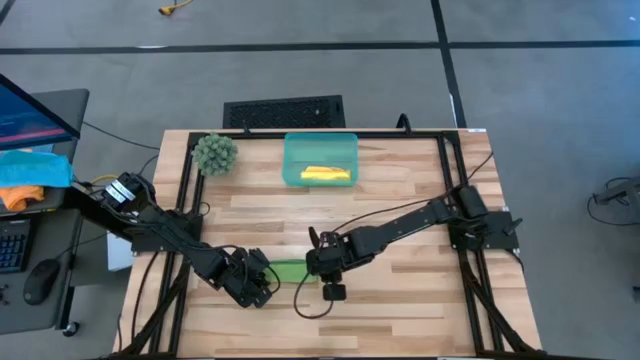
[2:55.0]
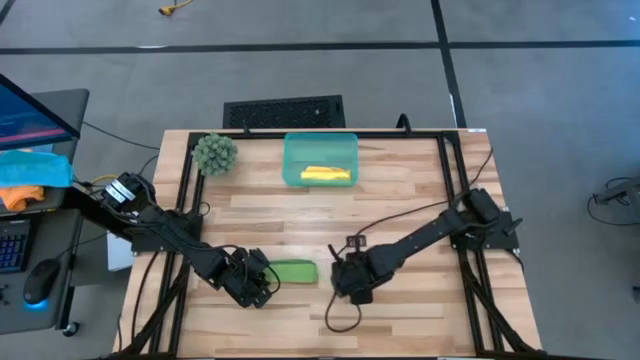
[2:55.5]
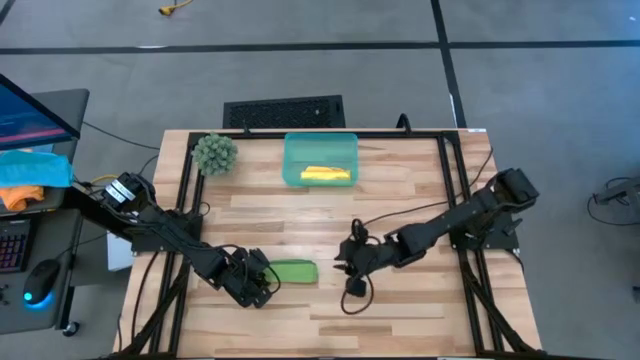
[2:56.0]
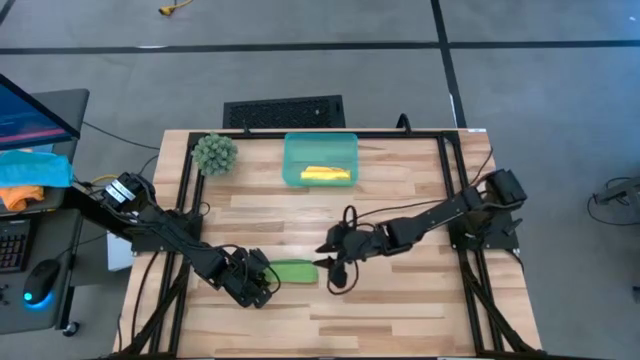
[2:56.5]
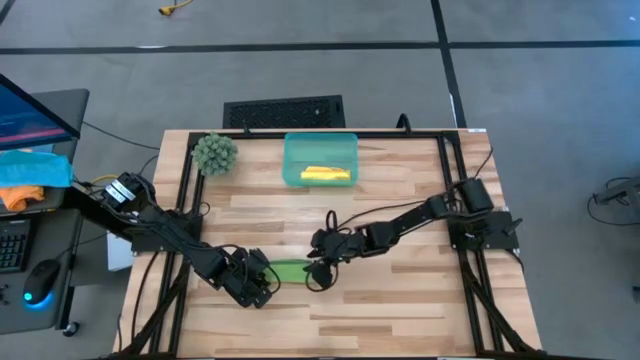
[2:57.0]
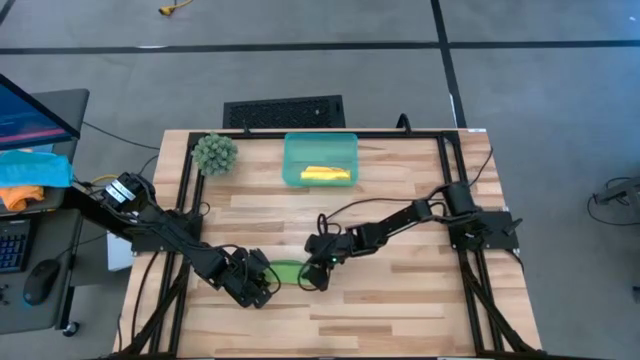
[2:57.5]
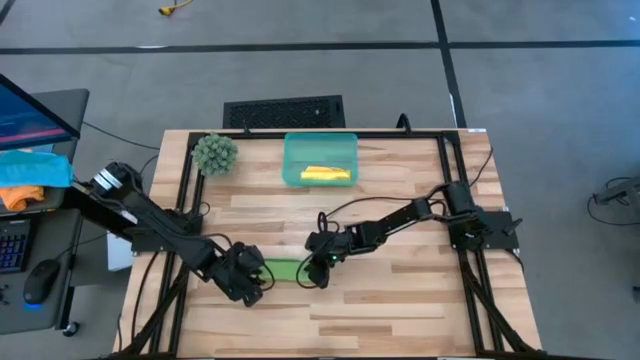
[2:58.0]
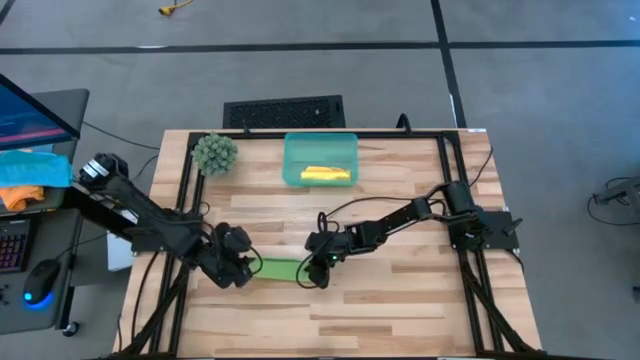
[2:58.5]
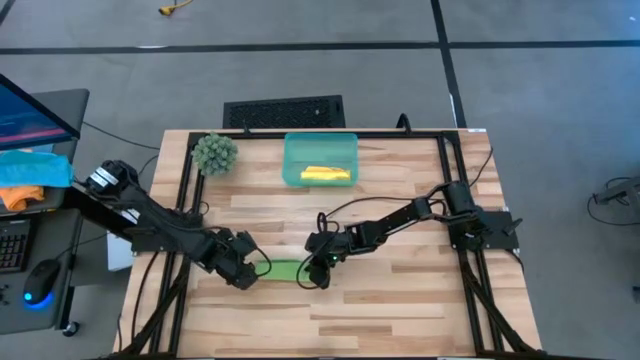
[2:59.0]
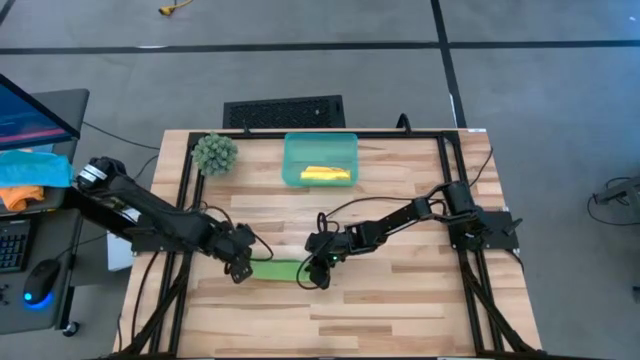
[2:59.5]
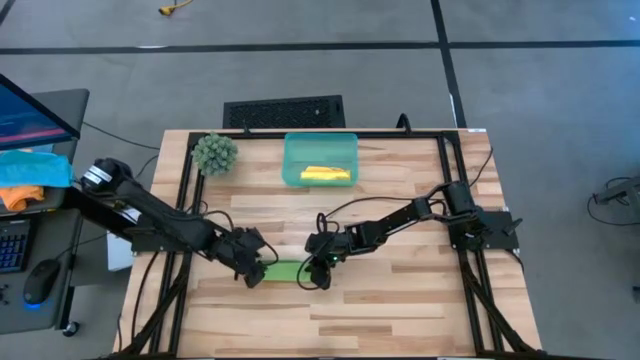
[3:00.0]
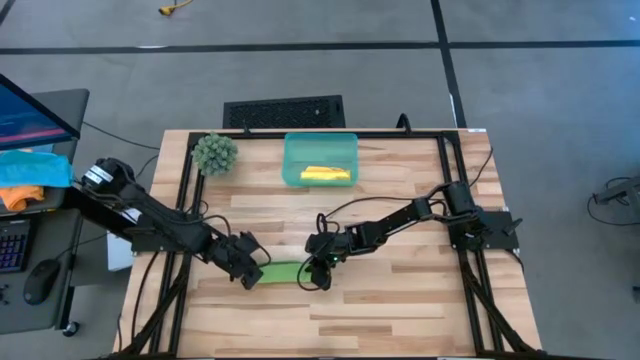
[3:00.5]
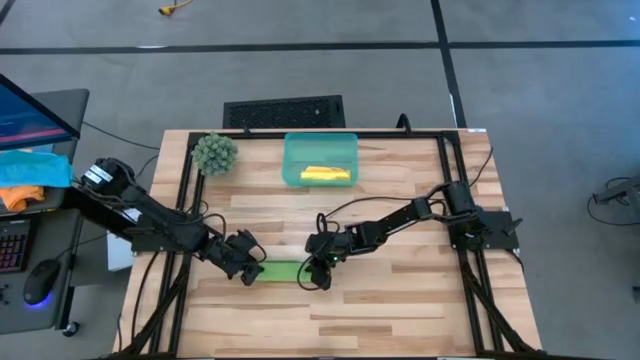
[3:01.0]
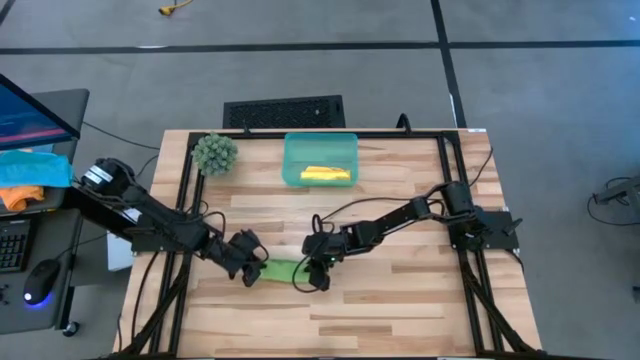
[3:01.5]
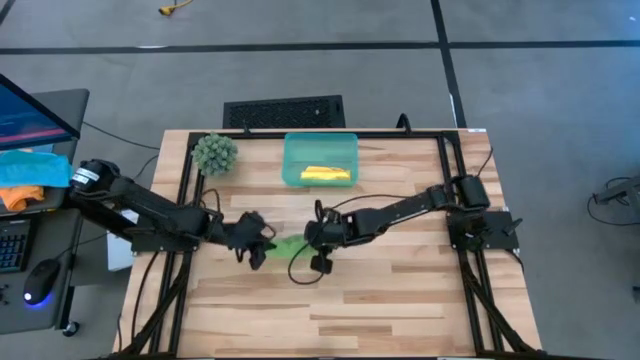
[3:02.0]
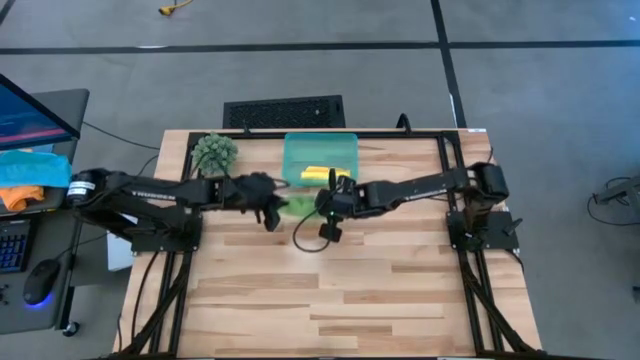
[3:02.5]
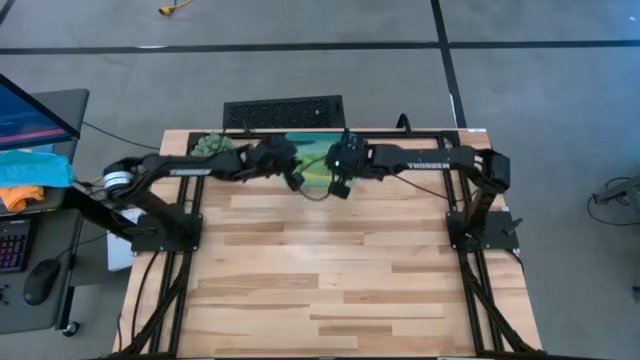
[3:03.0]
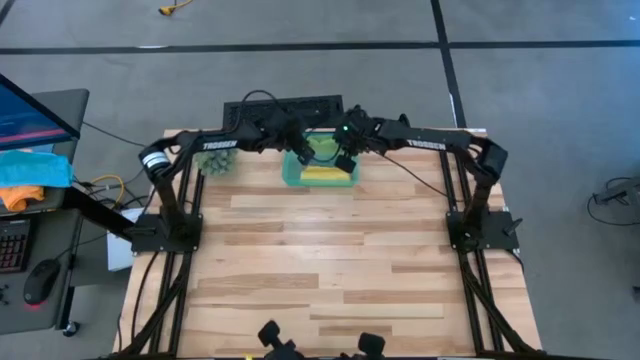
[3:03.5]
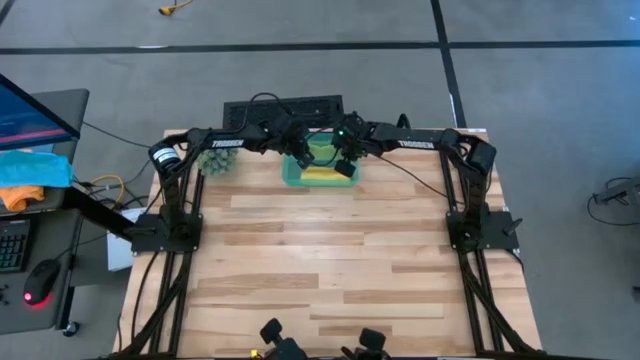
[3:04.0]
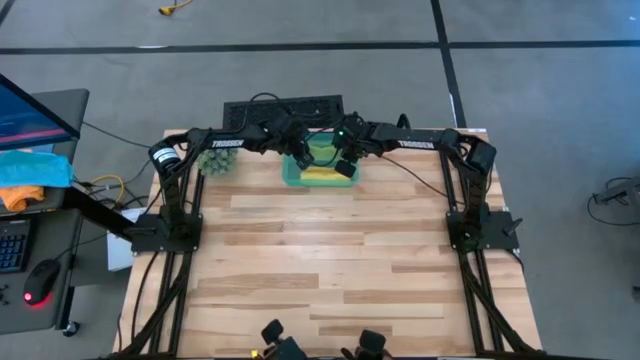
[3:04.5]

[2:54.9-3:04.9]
Task: Roll microfiber towels into tight, uniform cylinder then place into a basket
Put the green microfiber cloth into the green bin

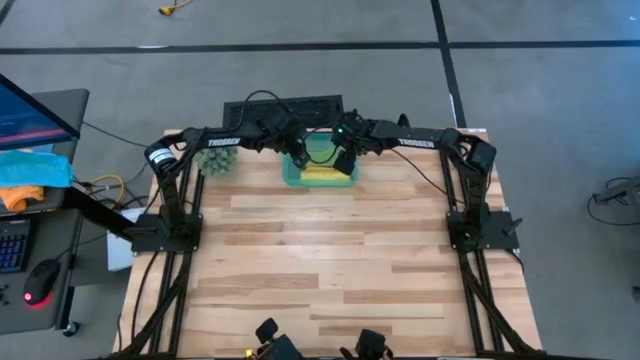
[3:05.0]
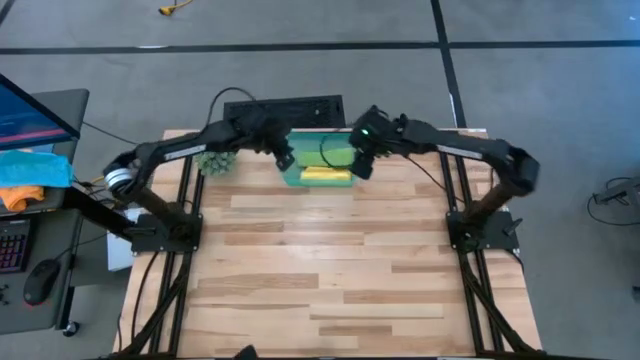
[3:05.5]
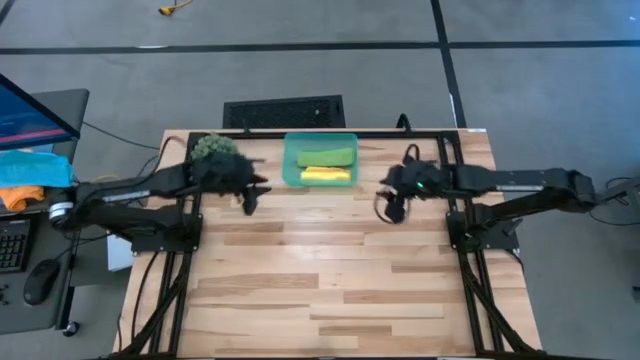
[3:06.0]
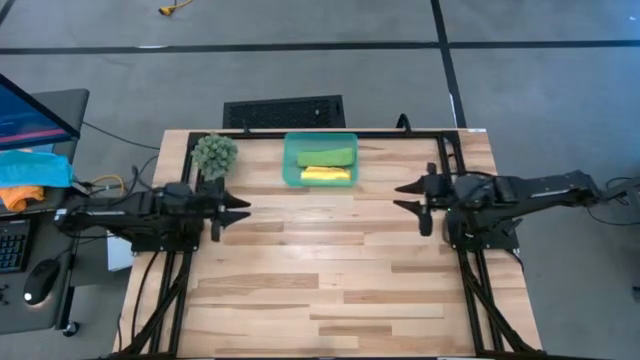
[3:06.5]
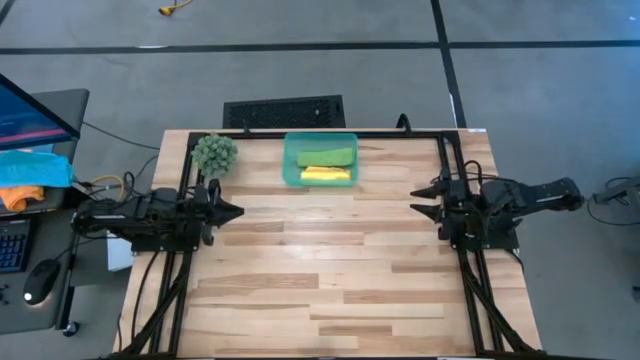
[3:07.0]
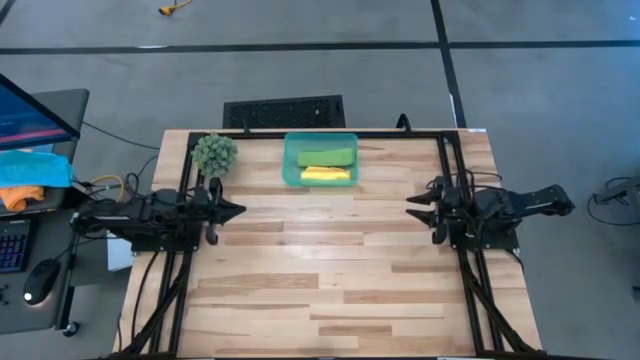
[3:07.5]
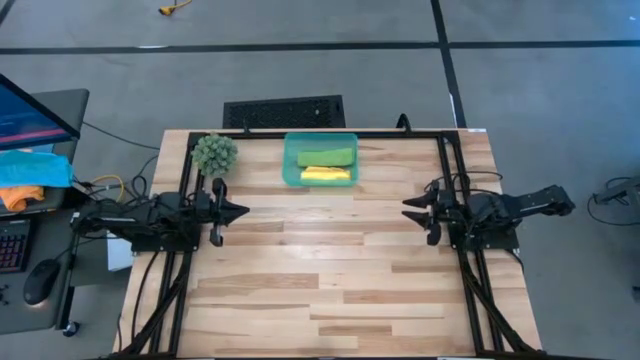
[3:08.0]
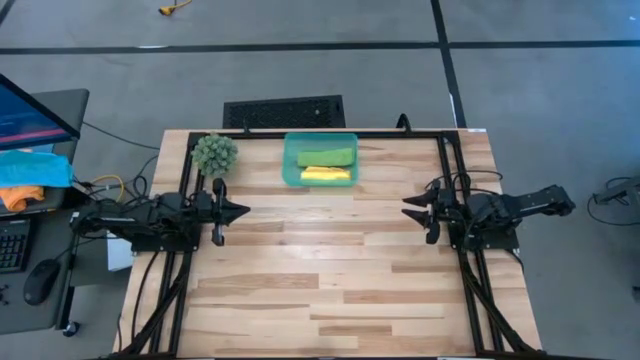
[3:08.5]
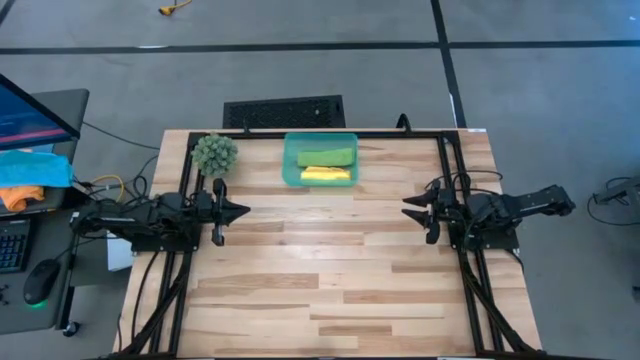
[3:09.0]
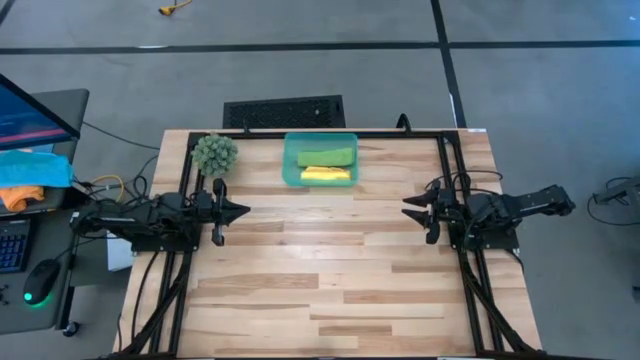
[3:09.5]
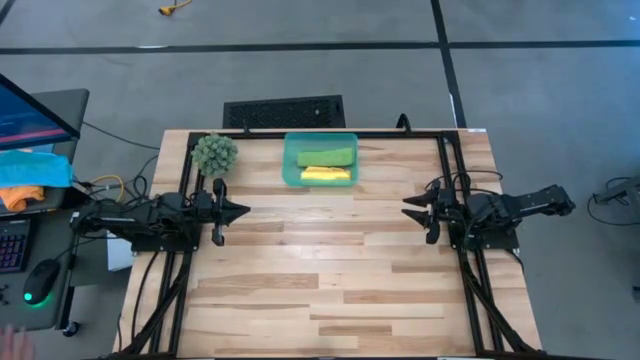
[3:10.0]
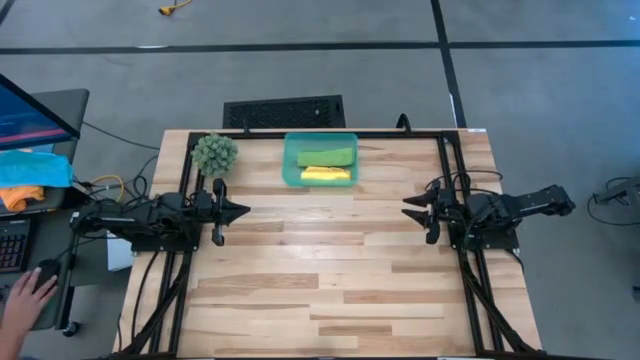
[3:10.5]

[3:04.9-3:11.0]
Return to Home Position
